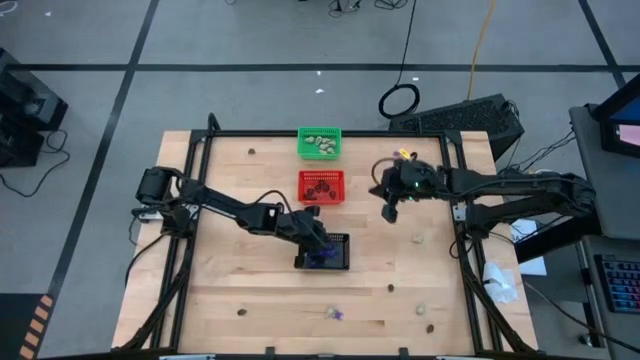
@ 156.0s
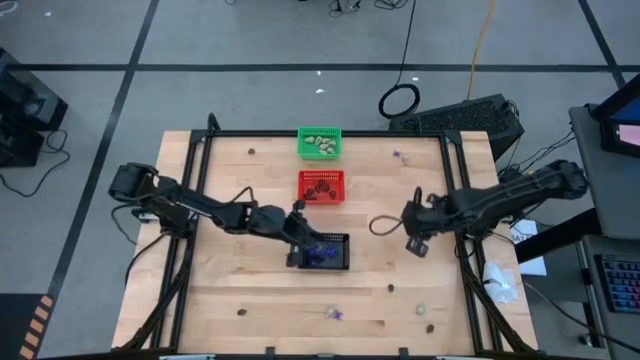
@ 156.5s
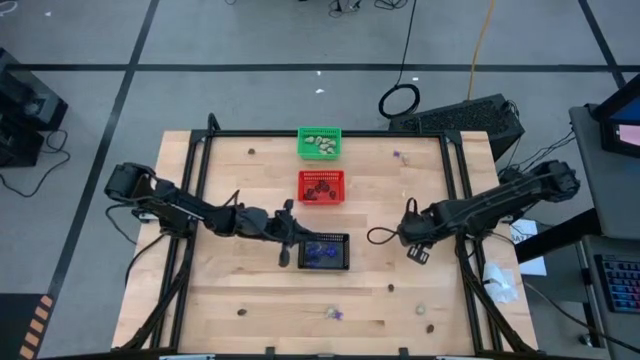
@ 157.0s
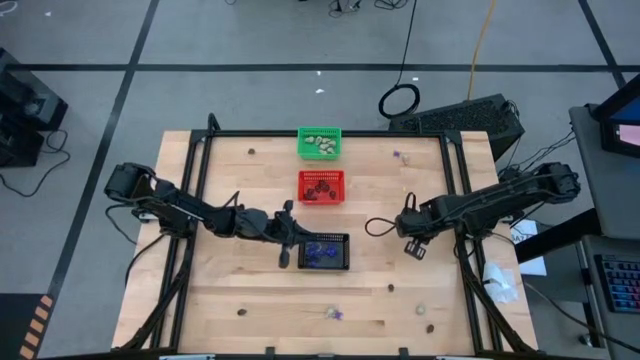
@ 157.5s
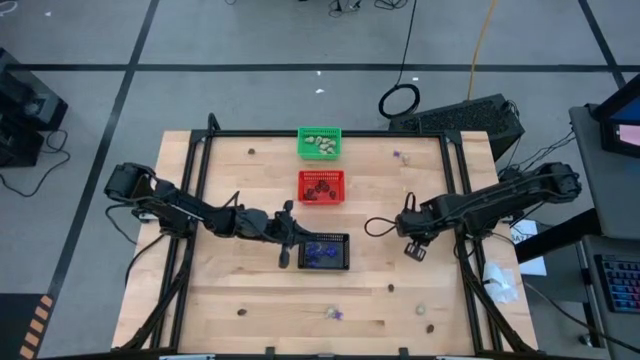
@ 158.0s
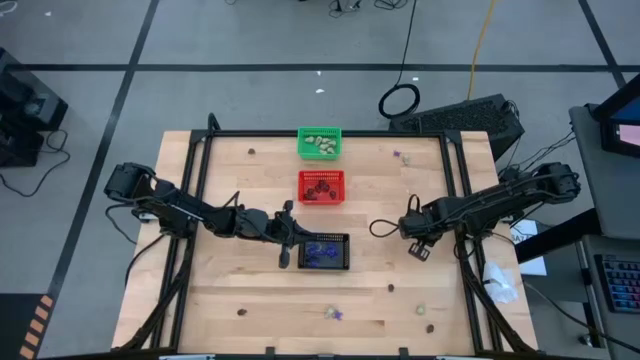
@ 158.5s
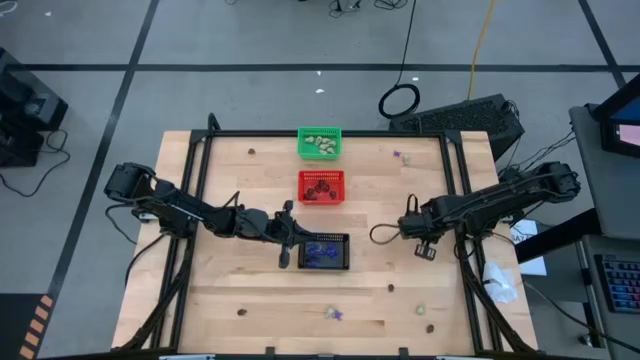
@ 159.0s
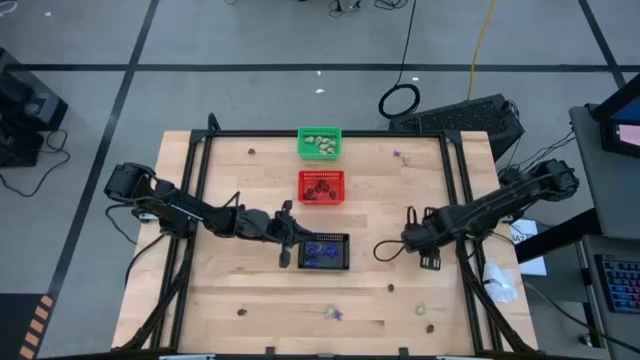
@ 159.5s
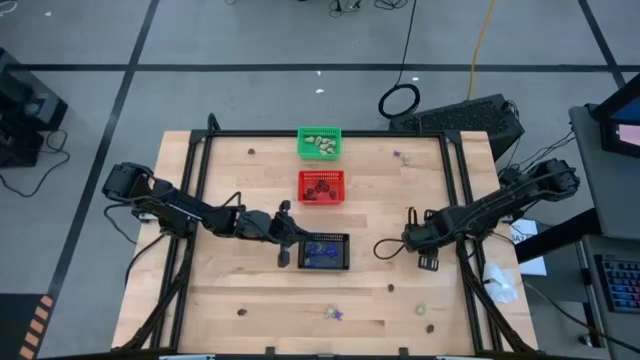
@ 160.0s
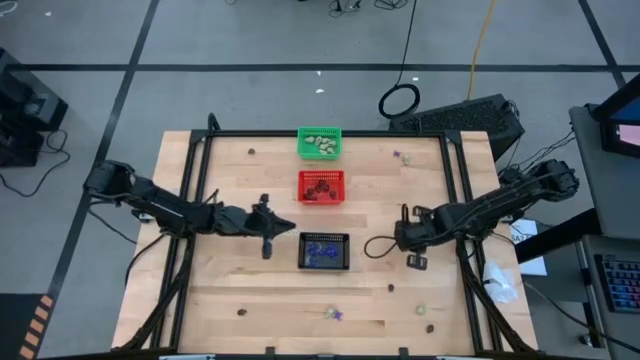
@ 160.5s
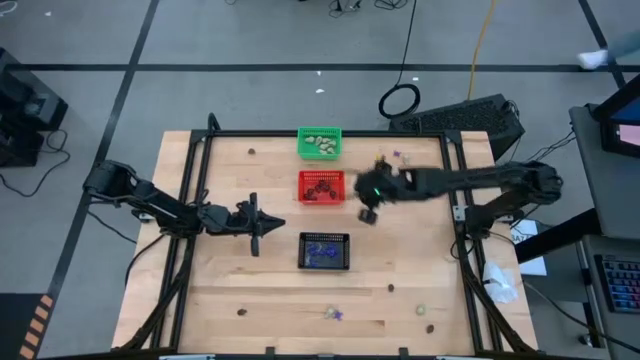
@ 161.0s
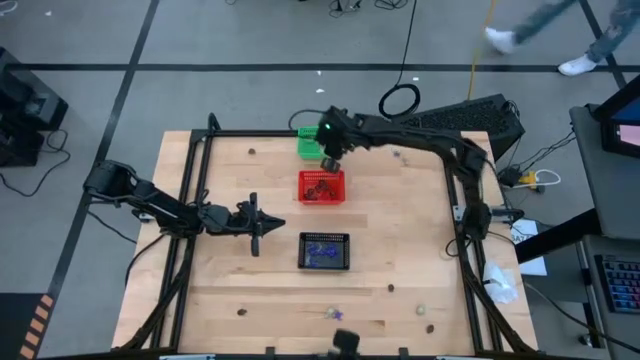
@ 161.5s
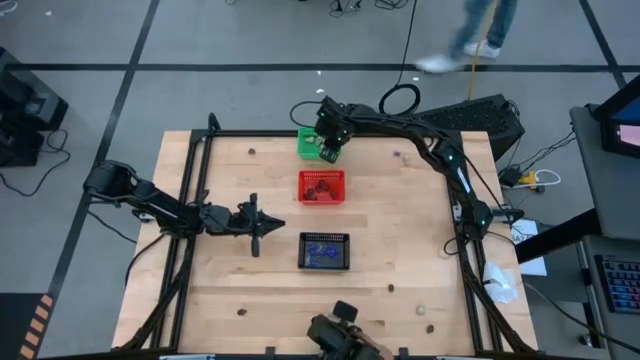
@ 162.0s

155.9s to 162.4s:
Task: Sort Halloween decoration
Put the white skull toy into the green basket

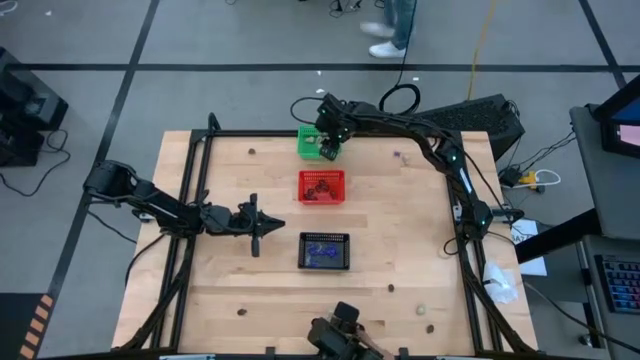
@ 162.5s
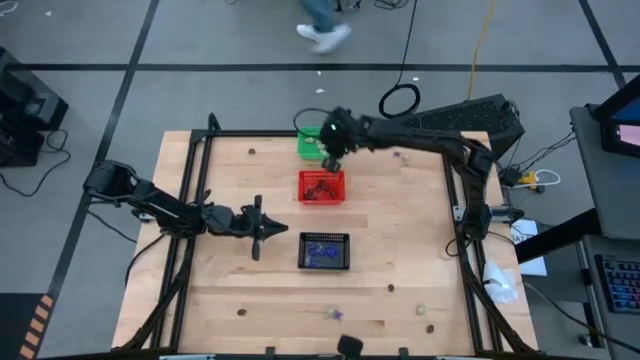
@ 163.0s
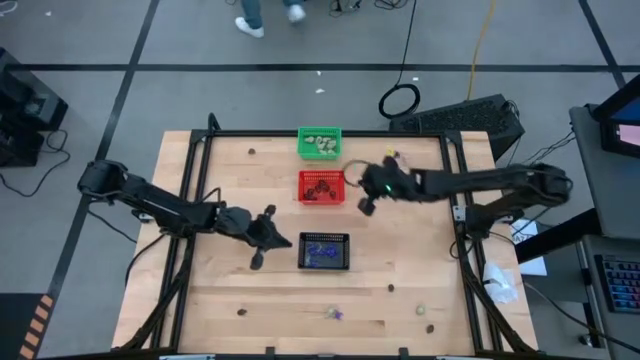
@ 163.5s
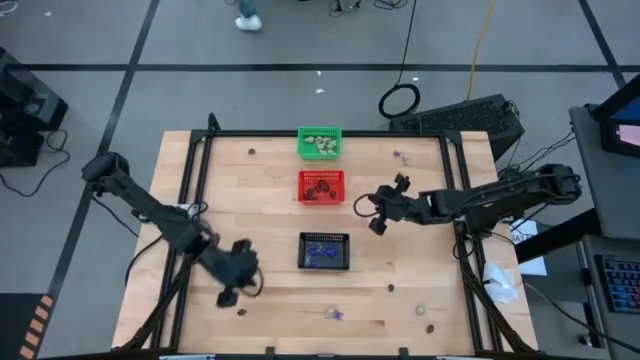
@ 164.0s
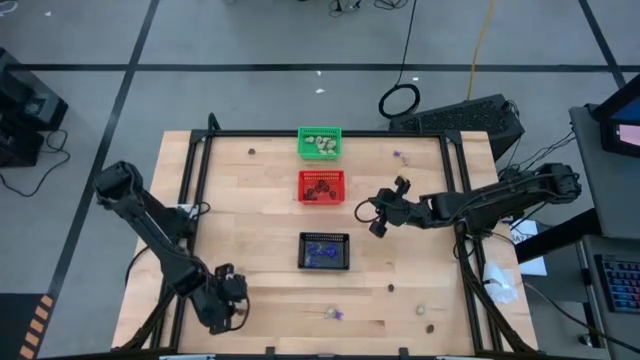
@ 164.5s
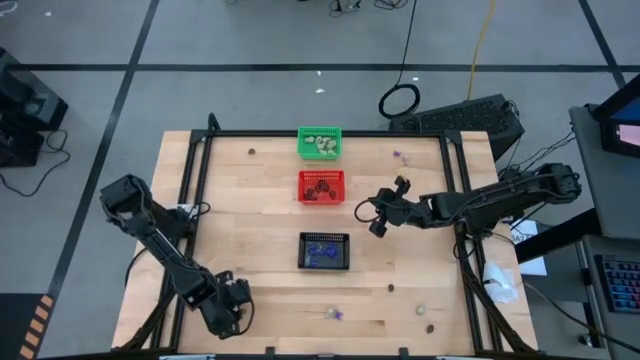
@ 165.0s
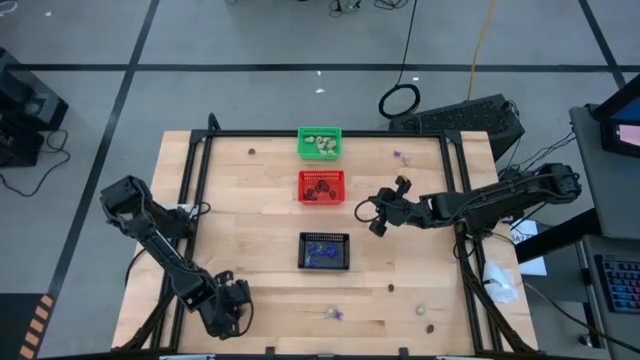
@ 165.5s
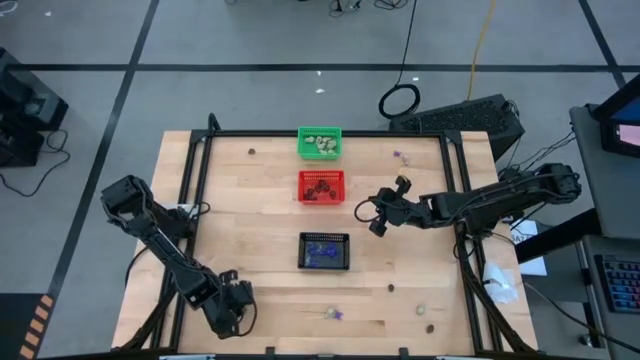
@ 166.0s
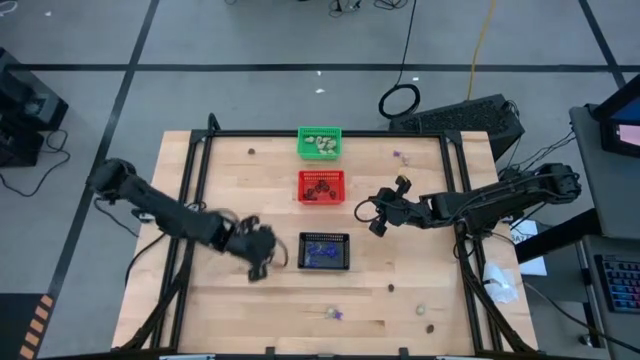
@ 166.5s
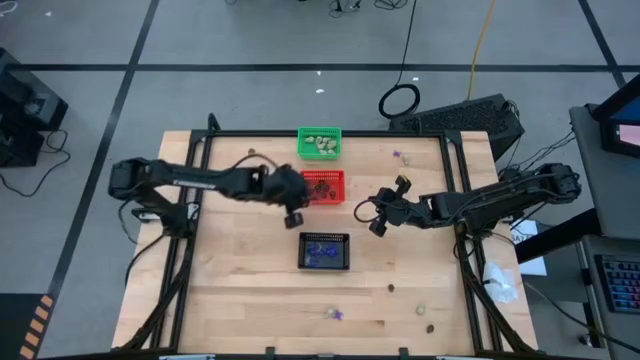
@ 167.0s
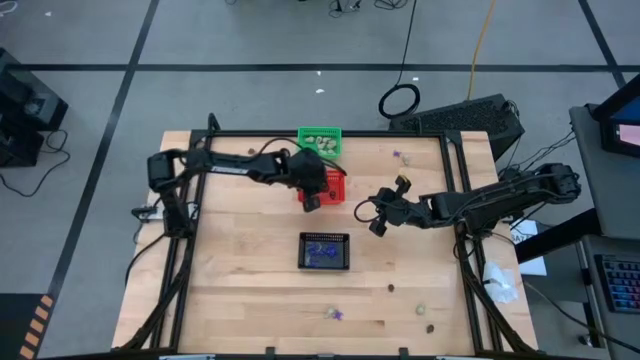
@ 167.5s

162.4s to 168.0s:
Put the black skull toy into the red basket

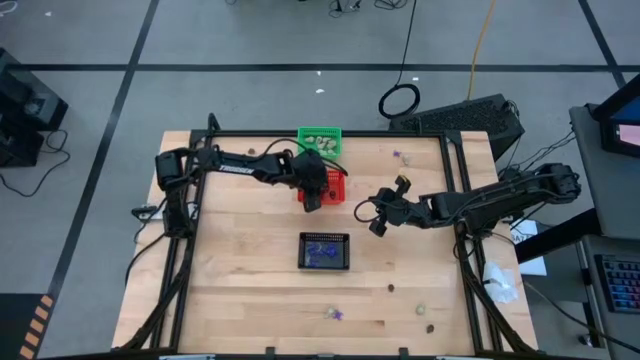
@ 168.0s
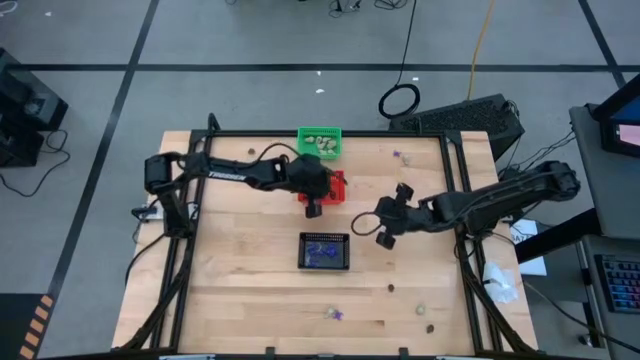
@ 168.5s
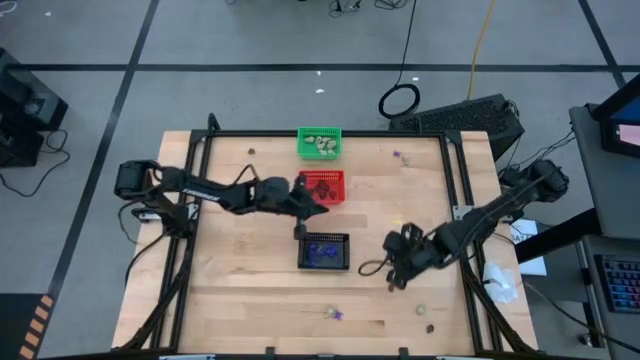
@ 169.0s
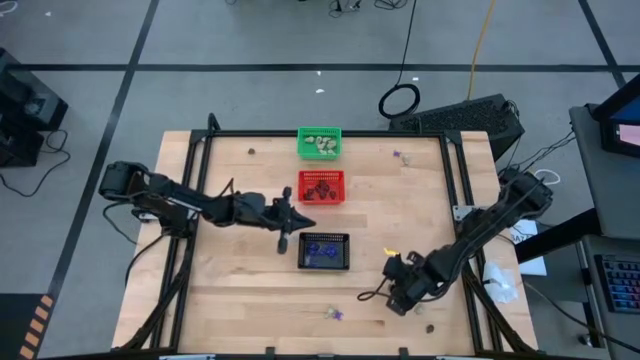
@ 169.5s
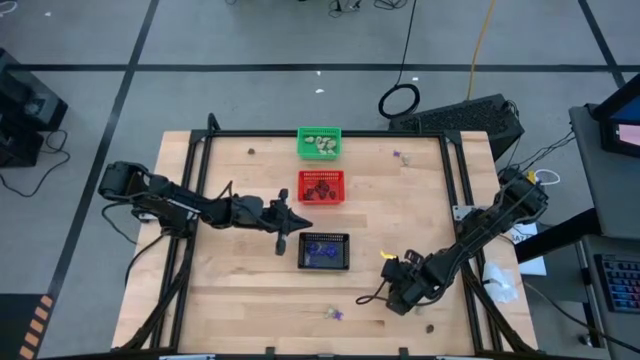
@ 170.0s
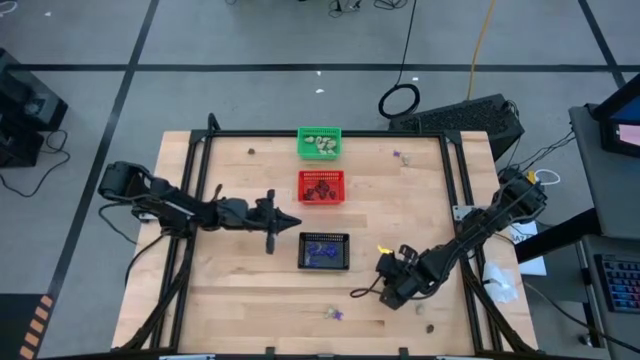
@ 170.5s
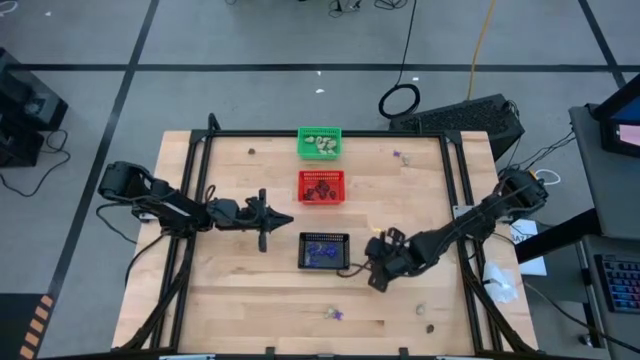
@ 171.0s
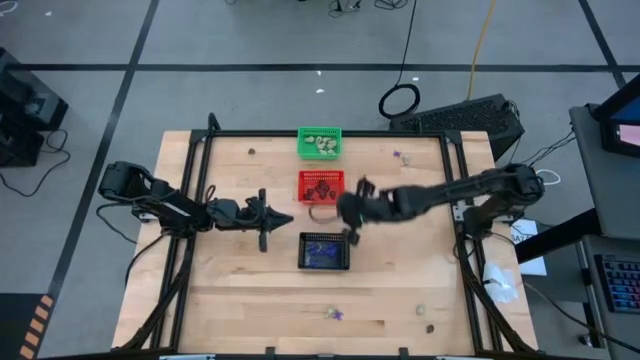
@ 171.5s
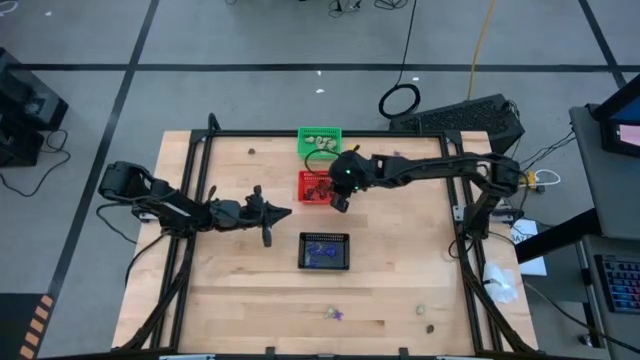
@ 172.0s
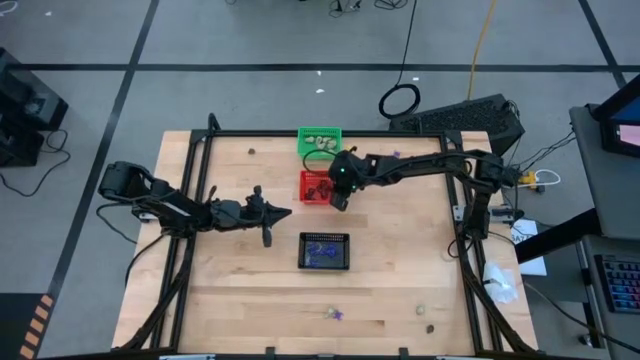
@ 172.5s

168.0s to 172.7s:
Put the black skull toy into the red basket

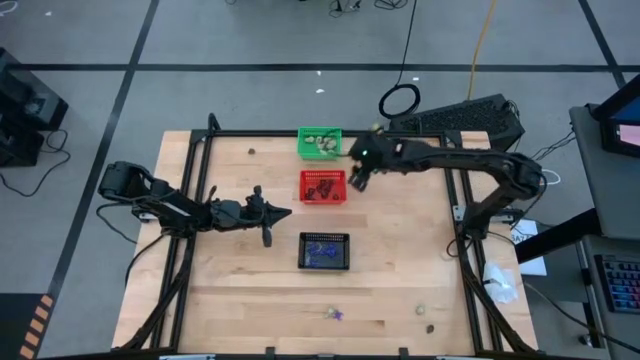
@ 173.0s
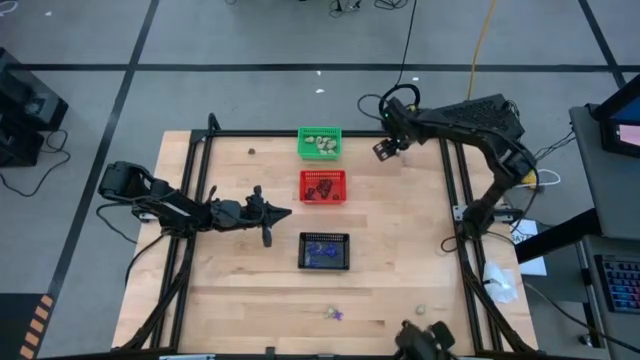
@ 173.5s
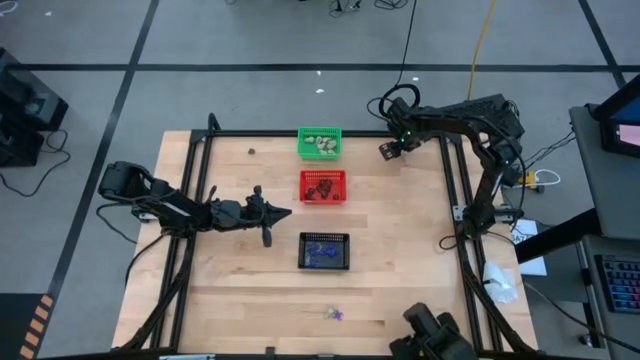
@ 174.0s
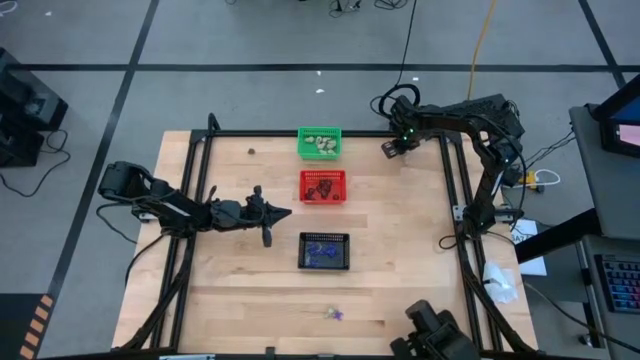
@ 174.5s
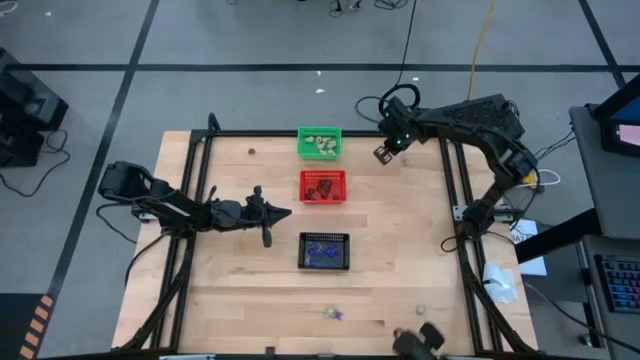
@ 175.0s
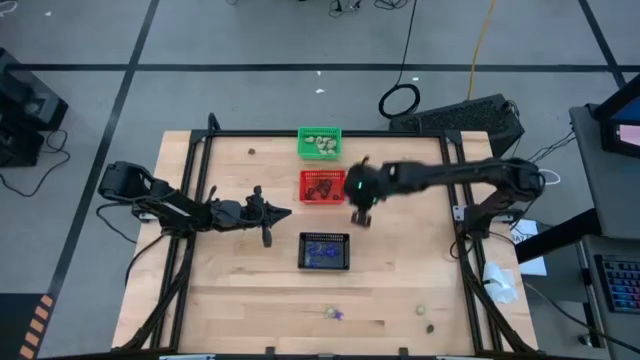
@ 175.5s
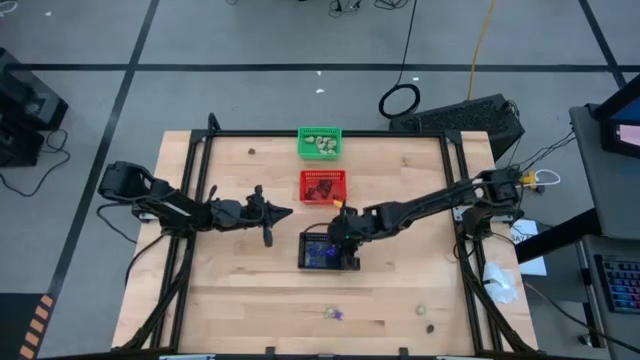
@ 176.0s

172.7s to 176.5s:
Put the violet spider toy into the black basket
